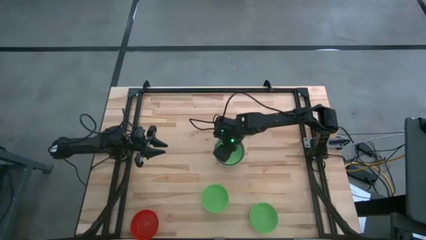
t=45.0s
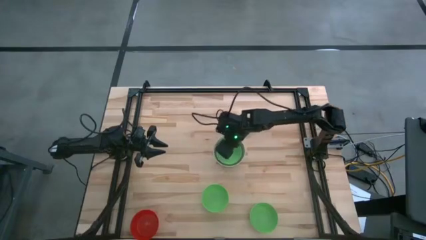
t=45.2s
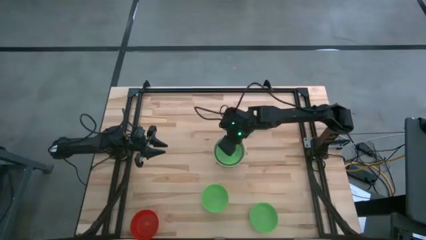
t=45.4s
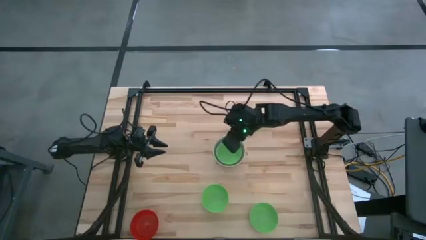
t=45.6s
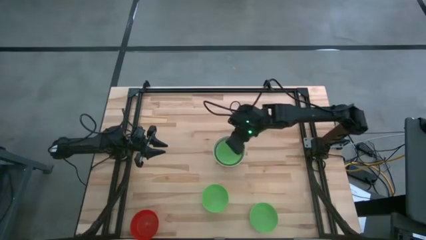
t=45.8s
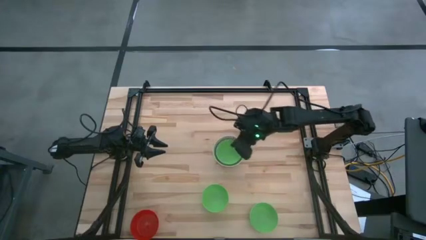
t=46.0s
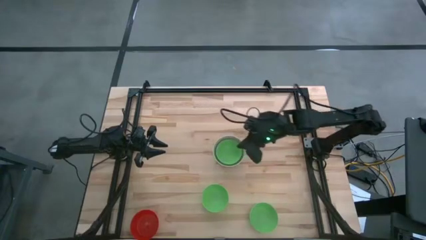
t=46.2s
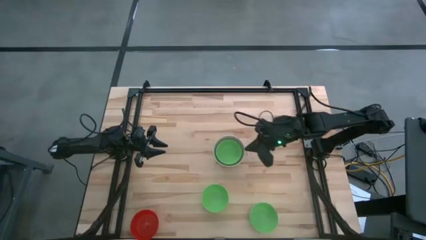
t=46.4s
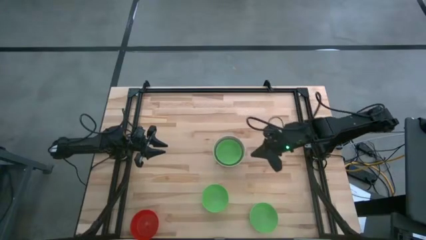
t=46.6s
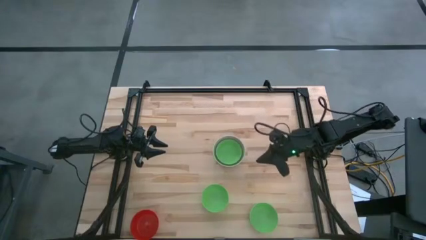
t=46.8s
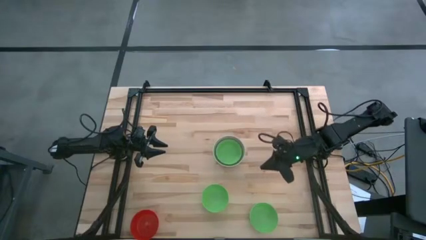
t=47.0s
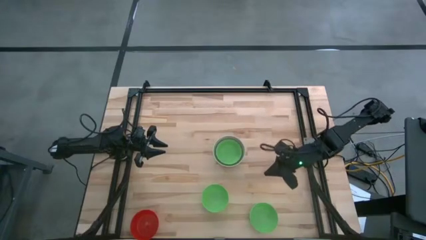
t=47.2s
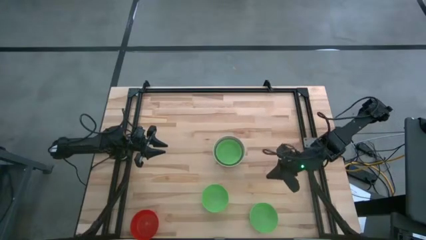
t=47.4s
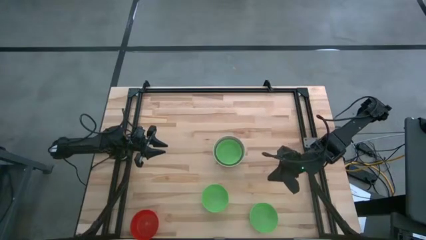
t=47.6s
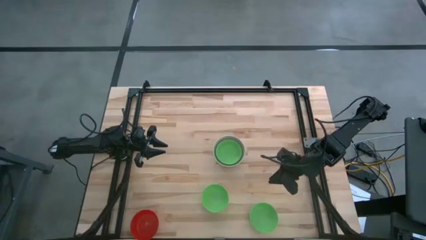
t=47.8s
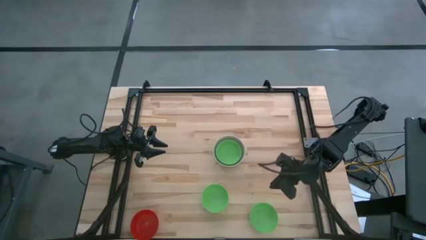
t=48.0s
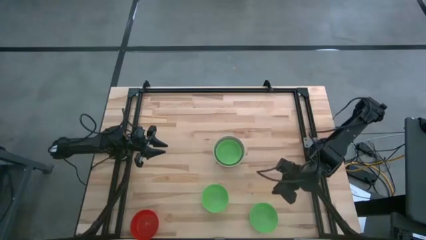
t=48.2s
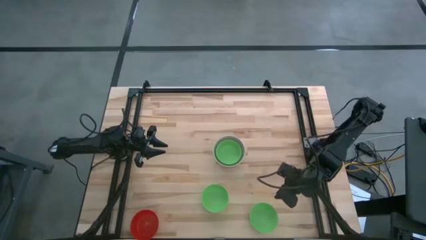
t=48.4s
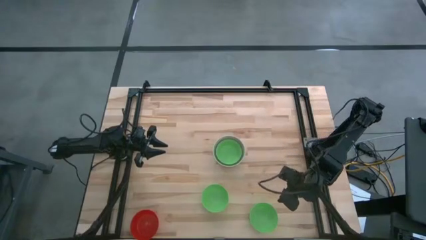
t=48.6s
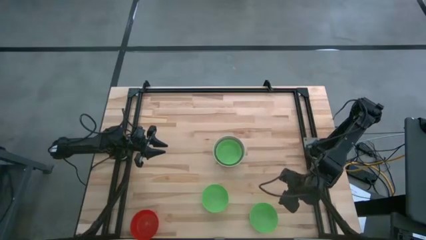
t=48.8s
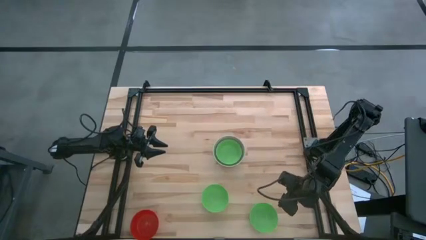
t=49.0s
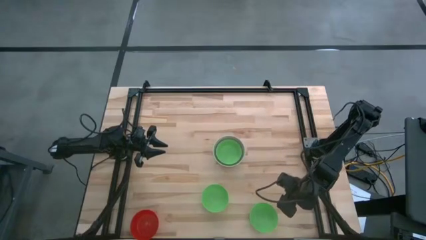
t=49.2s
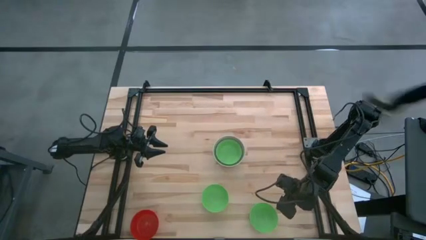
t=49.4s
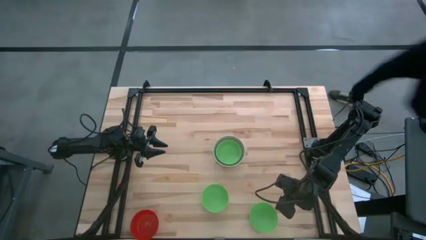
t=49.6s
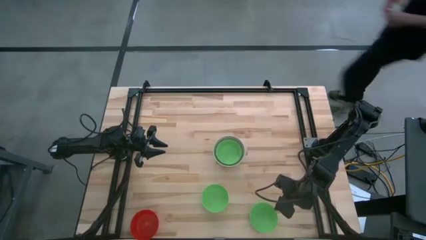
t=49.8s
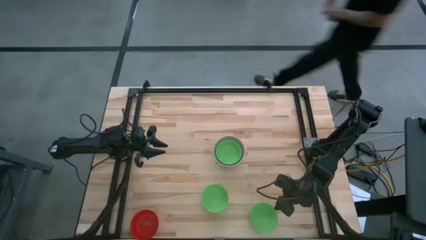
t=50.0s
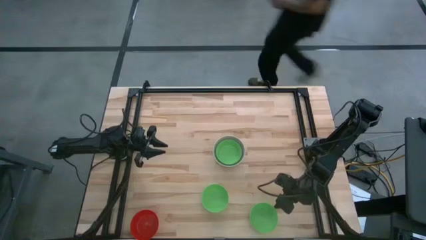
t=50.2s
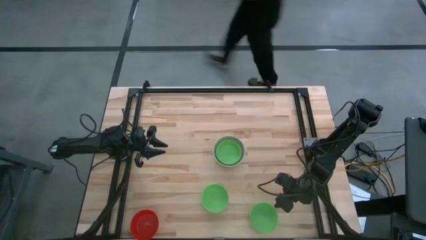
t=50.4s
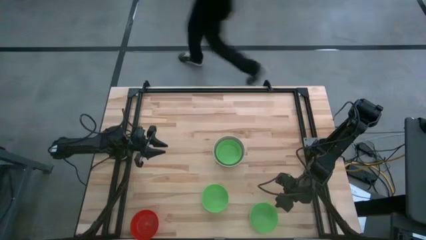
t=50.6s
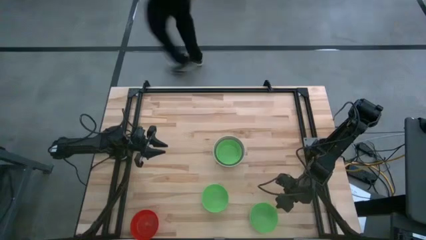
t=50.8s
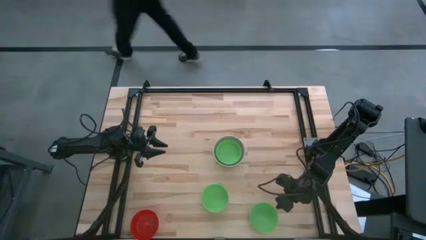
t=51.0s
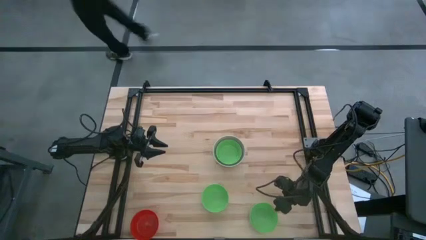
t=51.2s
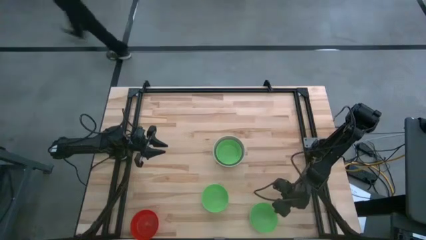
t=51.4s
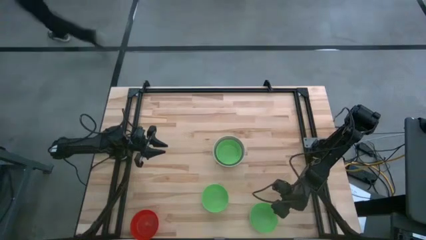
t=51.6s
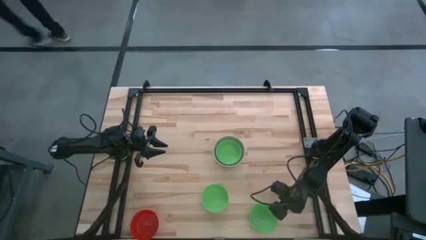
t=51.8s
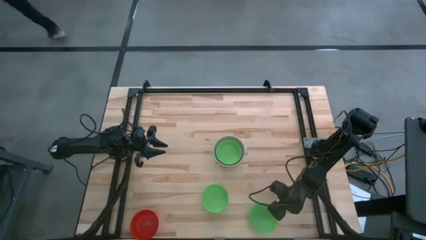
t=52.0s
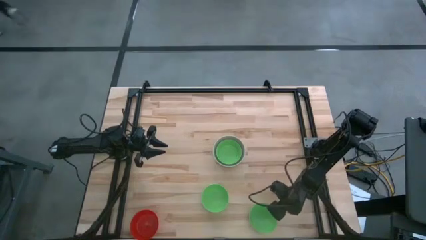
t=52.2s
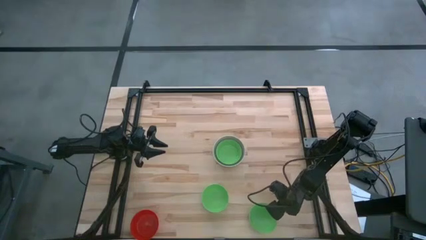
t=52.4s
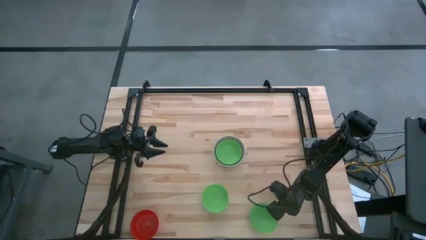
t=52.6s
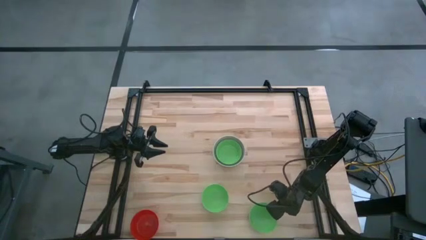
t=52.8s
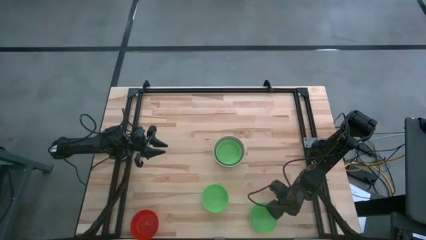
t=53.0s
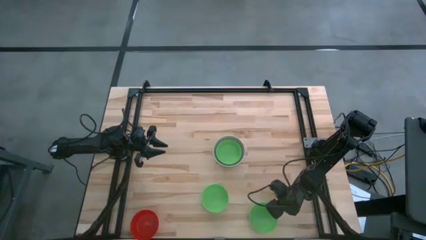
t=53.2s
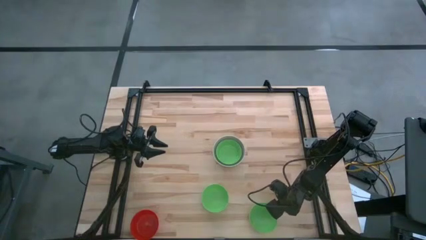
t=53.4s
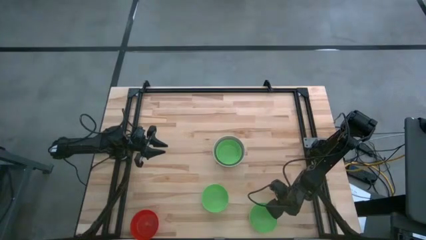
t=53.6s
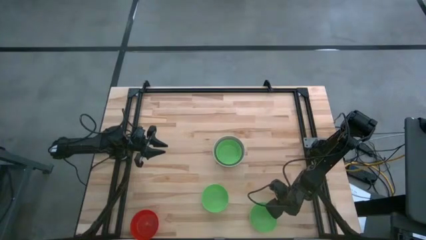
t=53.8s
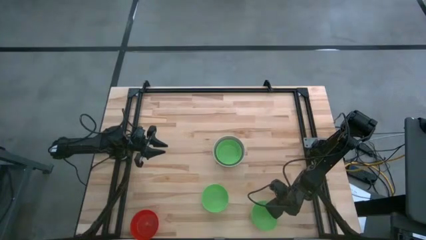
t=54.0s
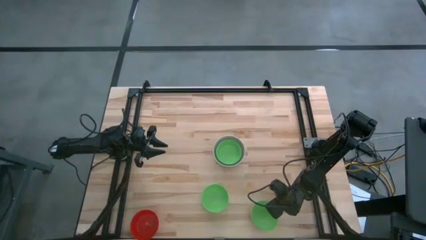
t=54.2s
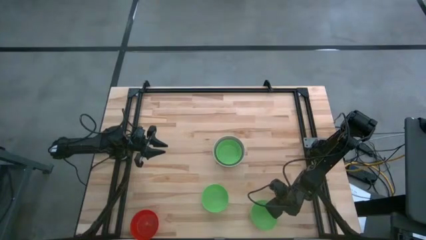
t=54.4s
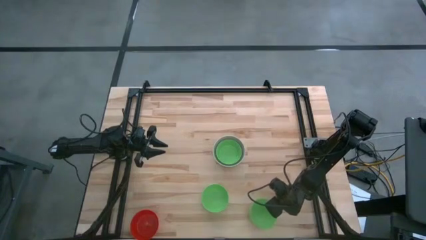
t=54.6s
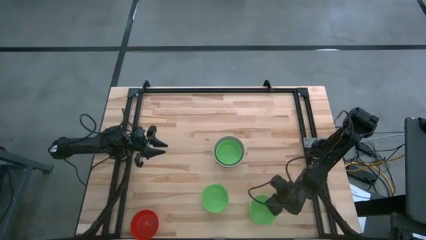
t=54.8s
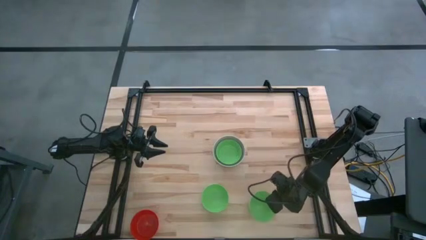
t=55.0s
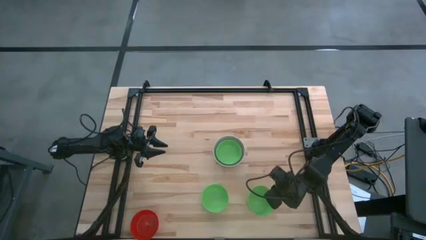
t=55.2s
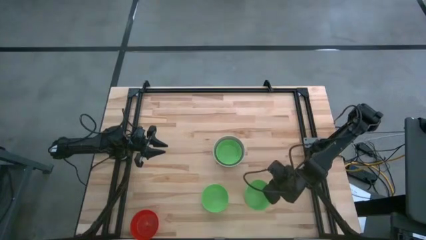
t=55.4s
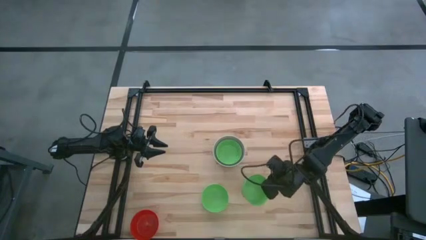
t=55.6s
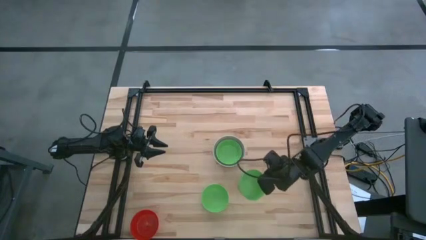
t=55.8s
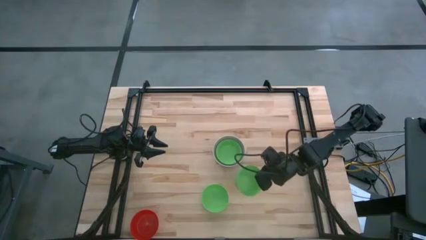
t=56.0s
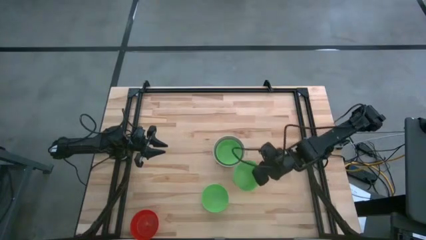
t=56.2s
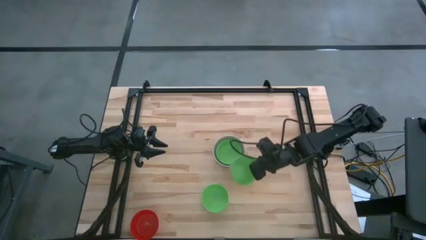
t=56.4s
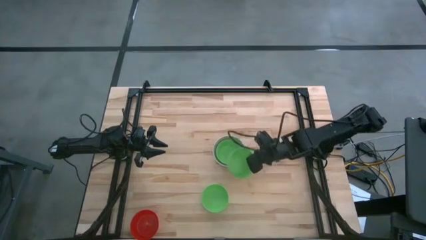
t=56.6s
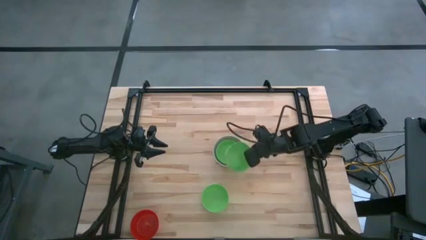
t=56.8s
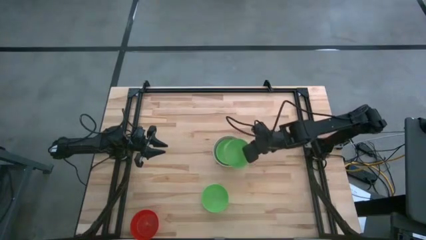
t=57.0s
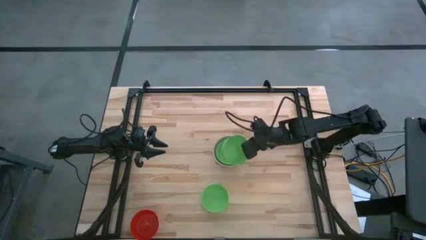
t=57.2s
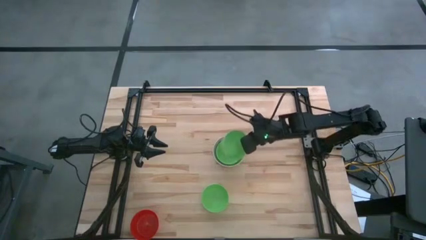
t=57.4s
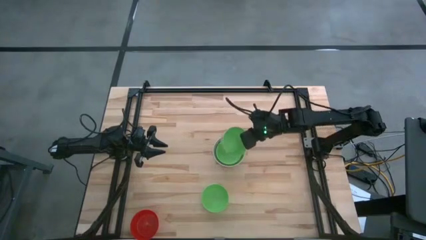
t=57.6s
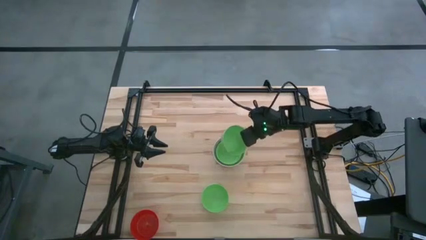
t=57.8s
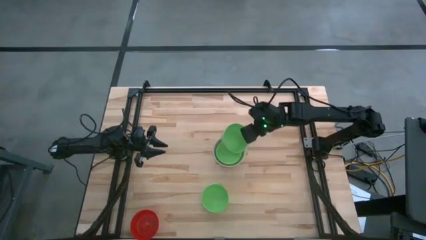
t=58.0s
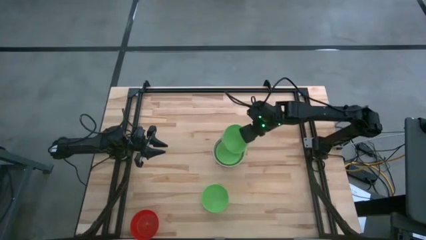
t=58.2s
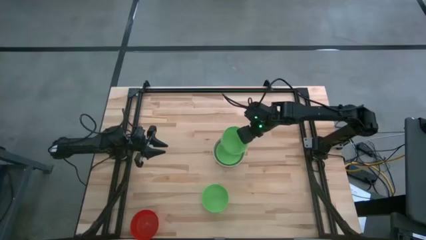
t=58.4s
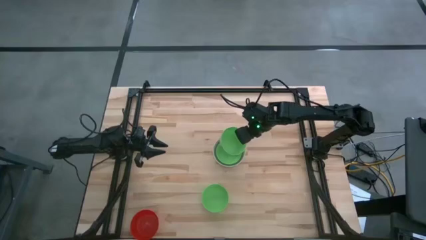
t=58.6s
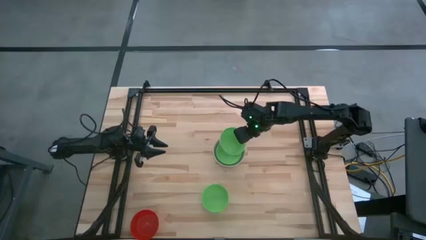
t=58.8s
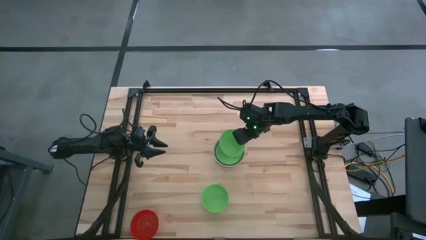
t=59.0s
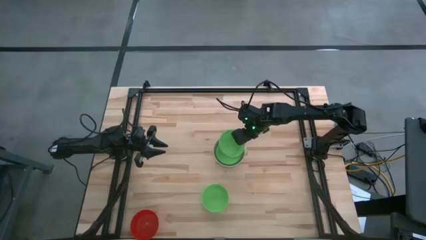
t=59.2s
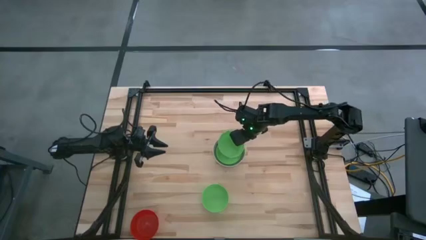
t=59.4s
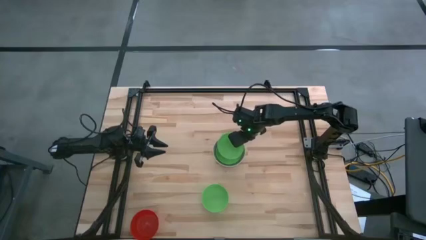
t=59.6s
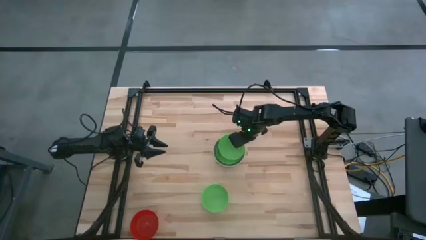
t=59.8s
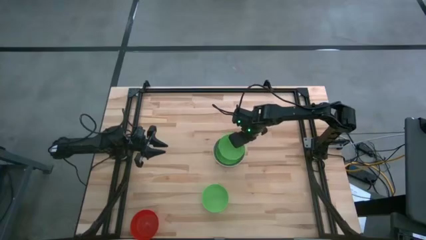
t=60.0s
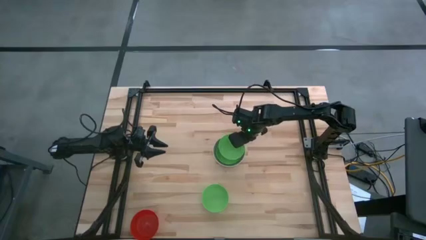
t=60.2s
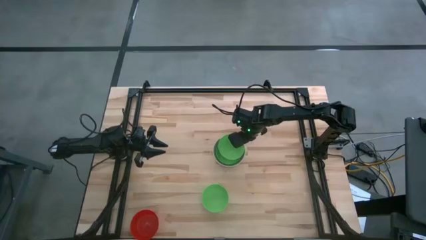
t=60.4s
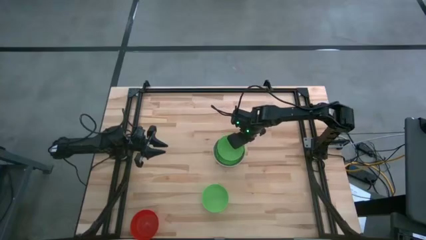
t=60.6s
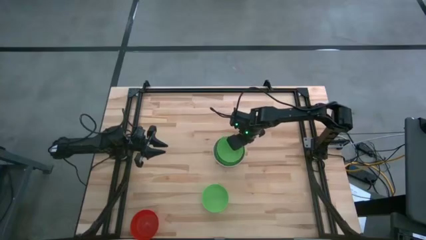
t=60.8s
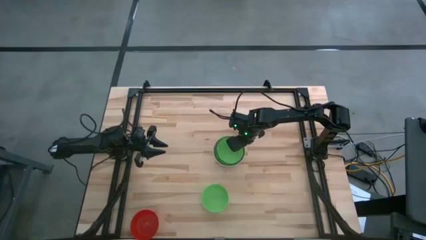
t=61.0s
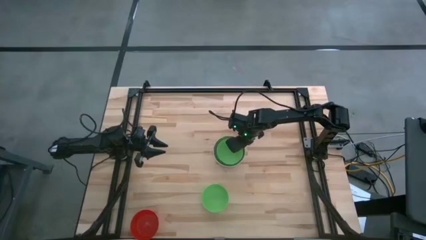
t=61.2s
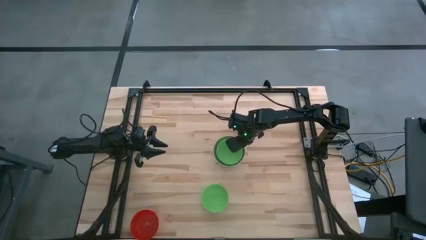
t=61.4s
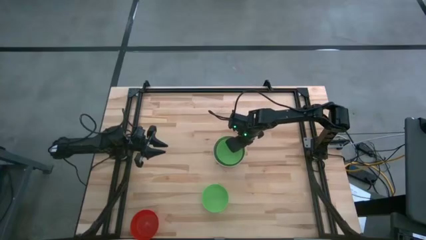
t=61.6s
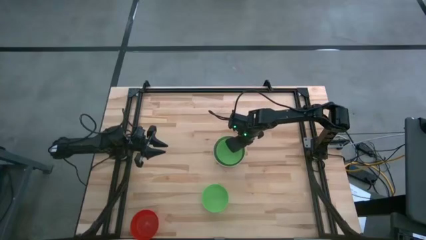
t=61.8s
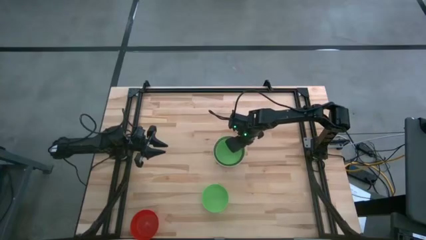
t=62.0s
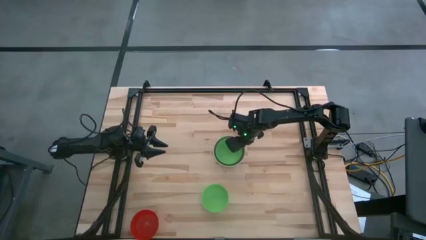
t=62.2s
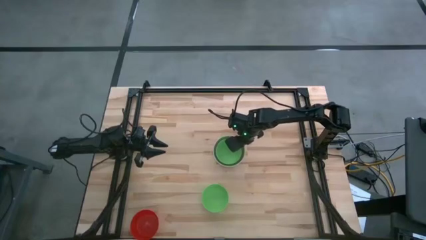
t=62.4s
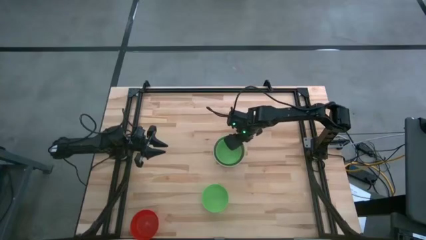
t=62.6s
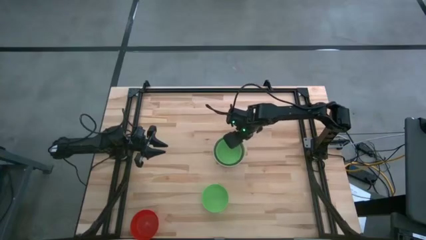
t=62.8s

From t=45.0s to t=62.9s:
Stack the right green bowl on top of the other green bowl
